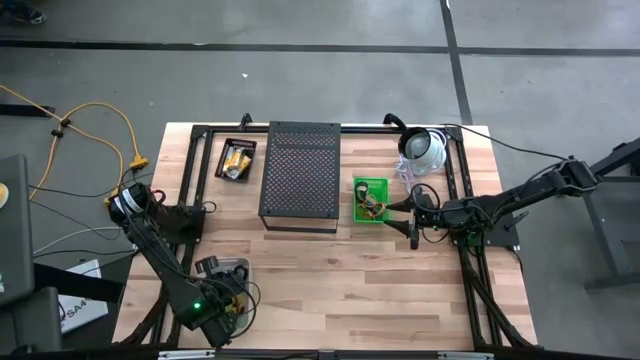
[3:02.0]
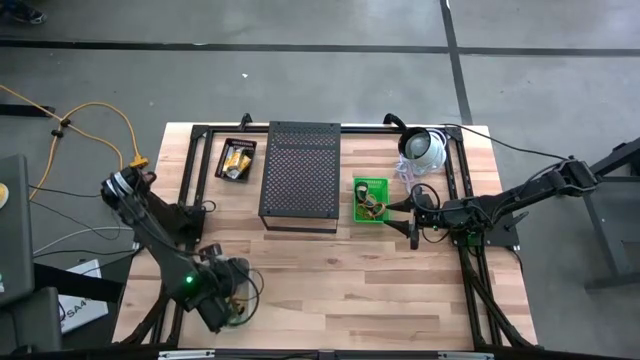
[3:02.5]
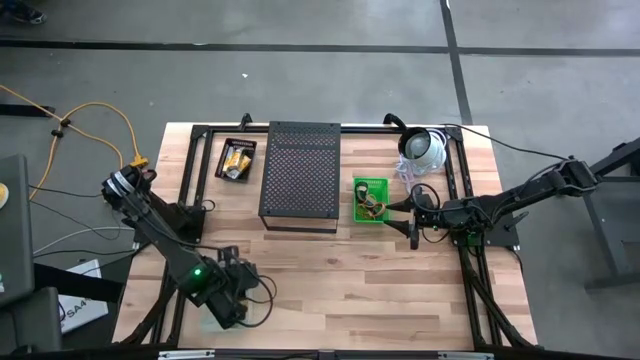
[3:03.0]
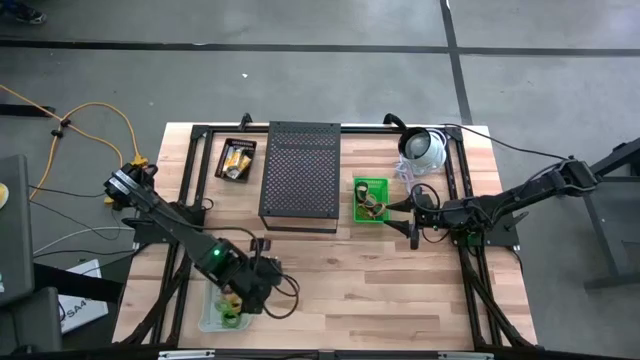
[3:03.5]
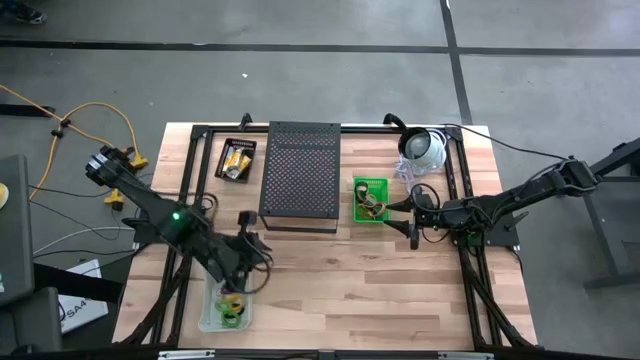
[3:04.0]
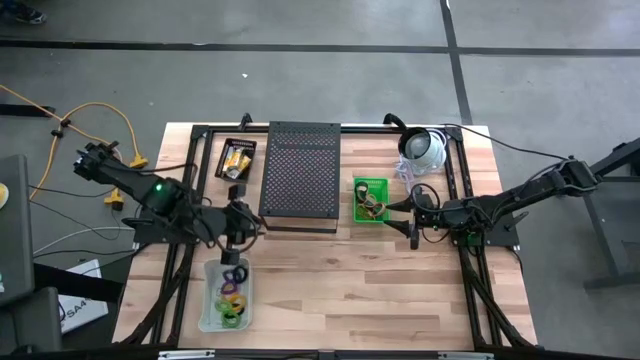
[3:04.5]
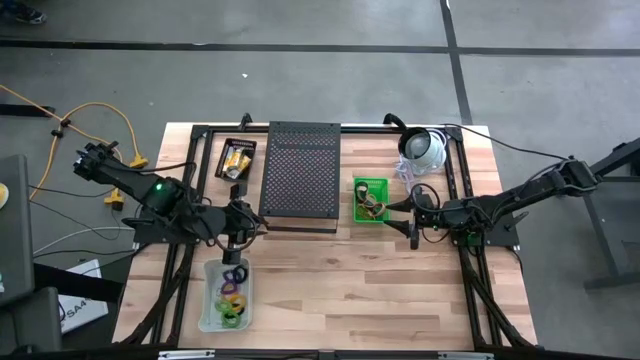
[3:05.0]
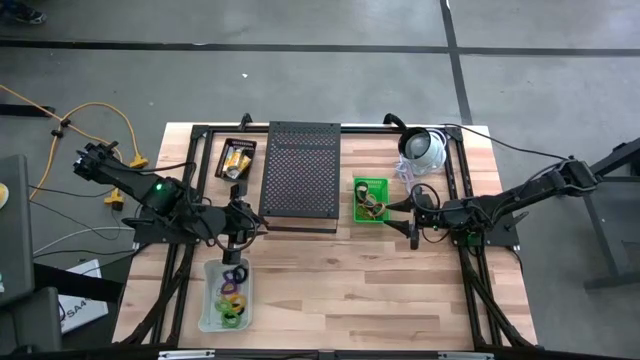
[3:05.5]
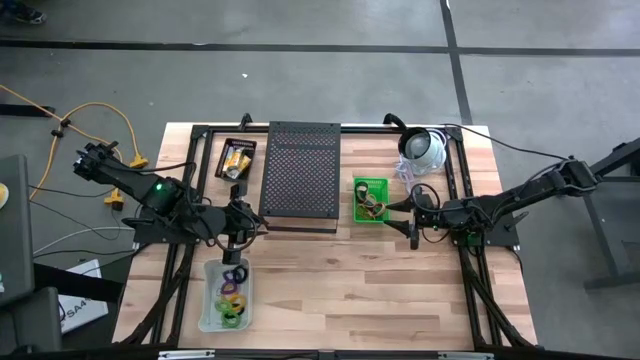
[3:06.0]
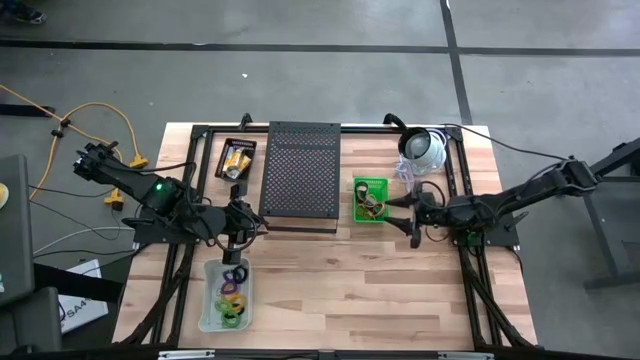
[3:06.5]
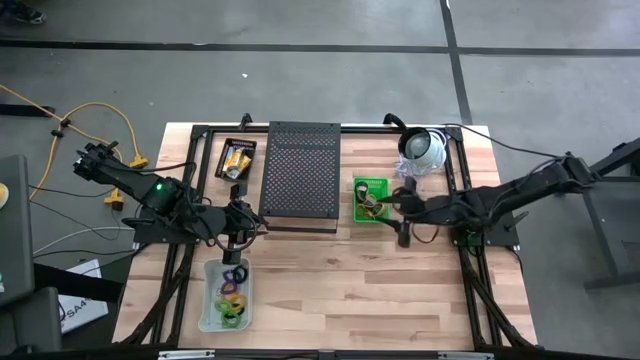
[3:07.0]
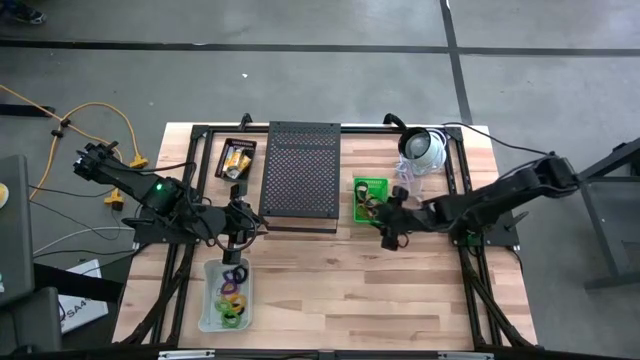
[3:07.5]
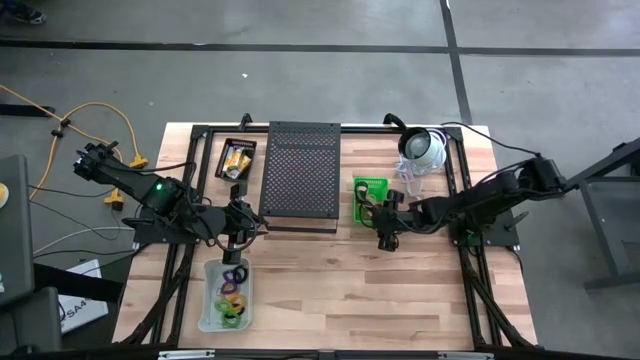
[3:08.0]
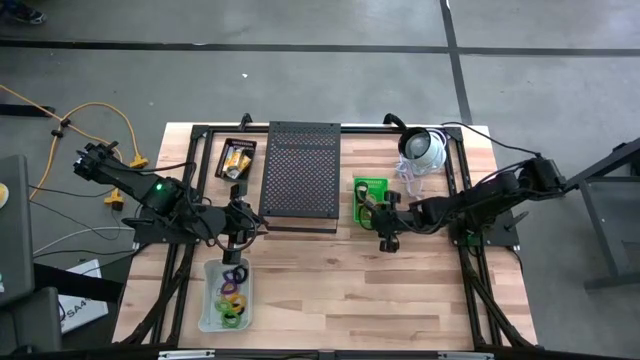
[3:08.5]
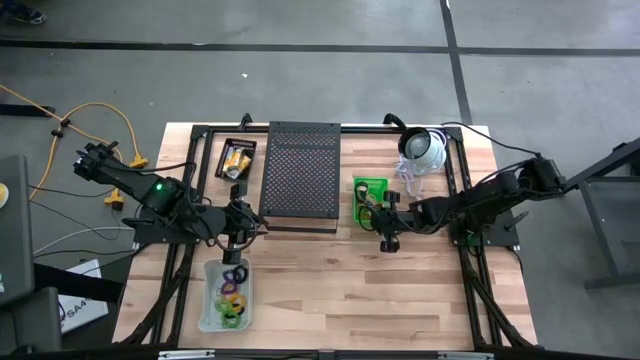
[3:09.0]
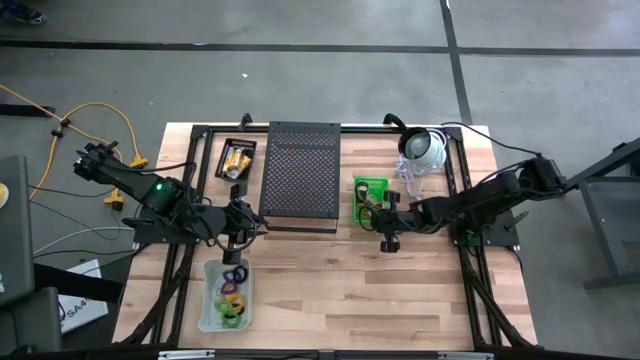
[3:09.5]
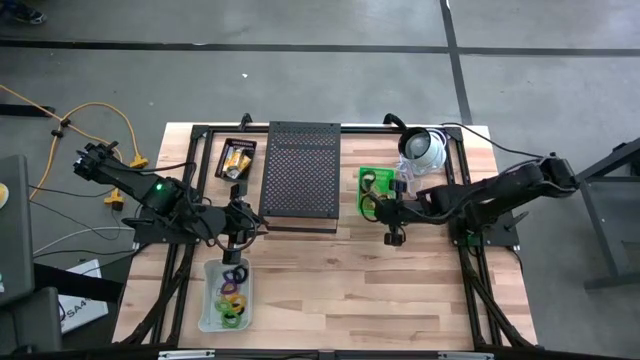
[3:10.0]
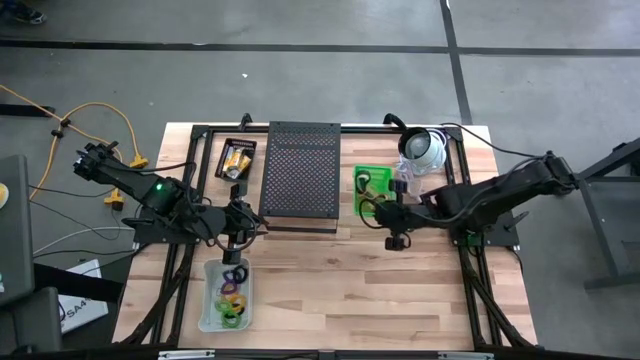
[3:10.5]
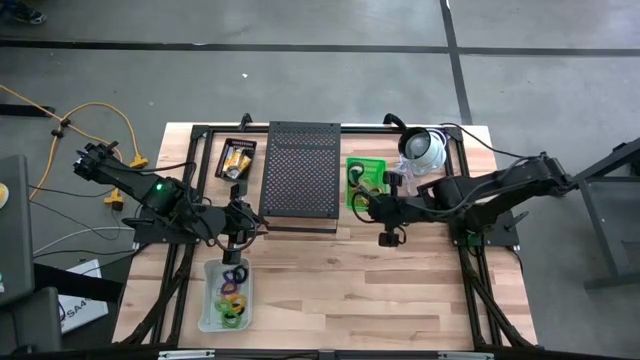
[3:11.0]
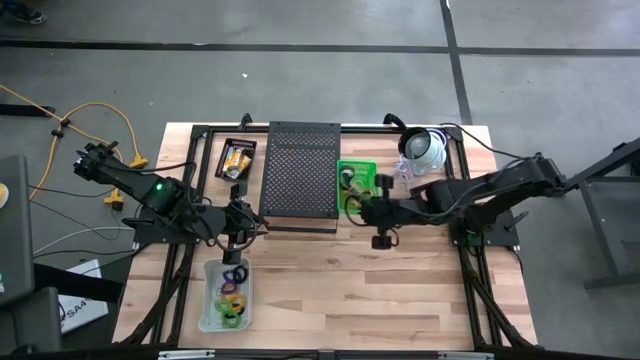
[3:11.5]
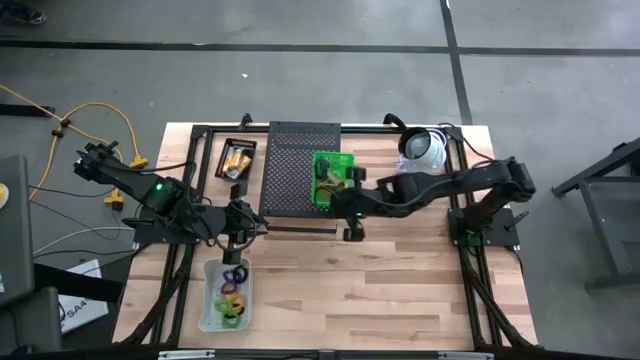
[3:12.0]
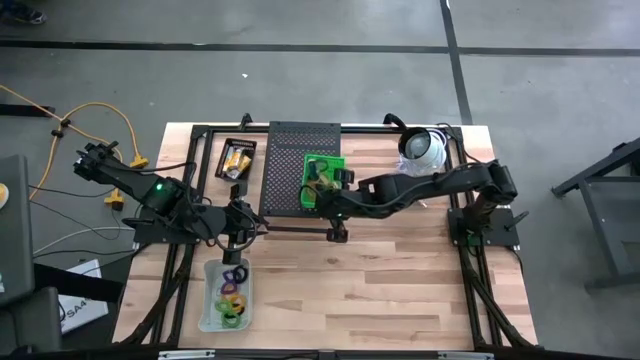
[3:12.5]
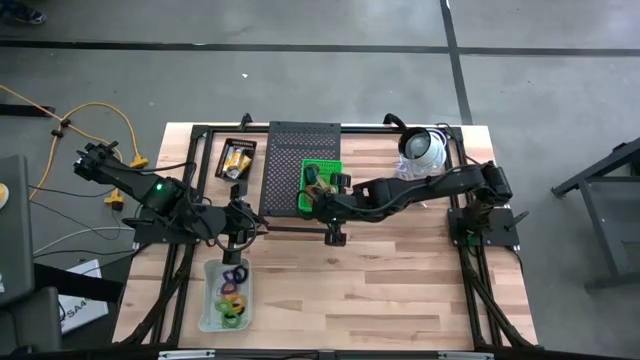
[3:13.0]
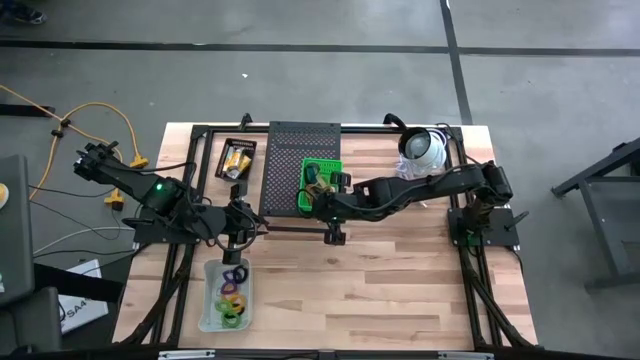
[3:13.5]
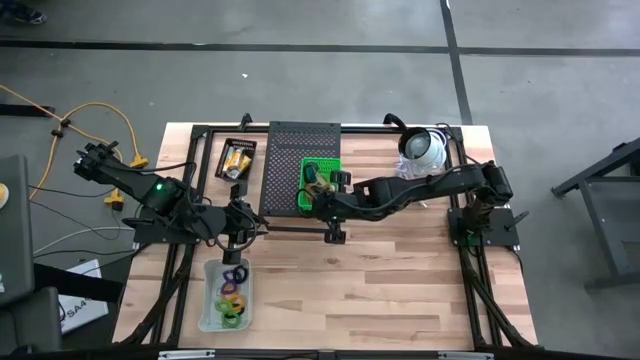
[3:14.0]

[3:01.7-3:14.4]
Task: Pick & Place Office Desk Supplies
Put the green bin with rubber bands on the shelf

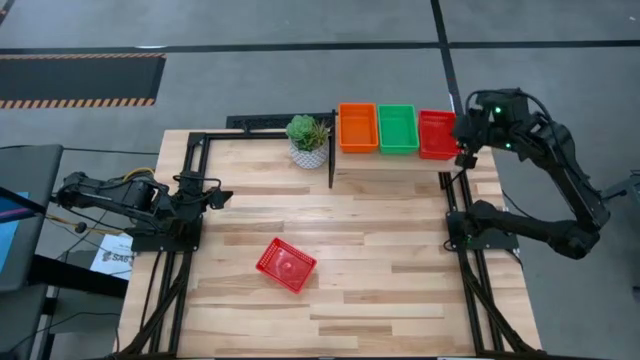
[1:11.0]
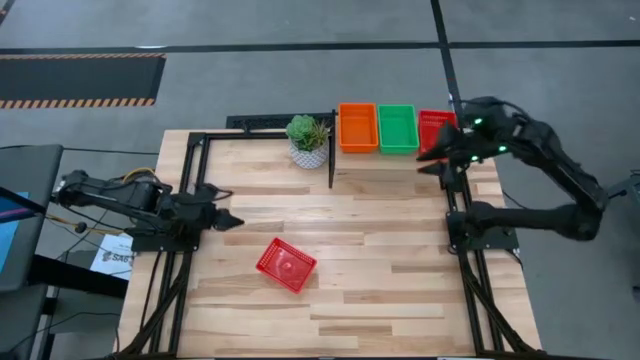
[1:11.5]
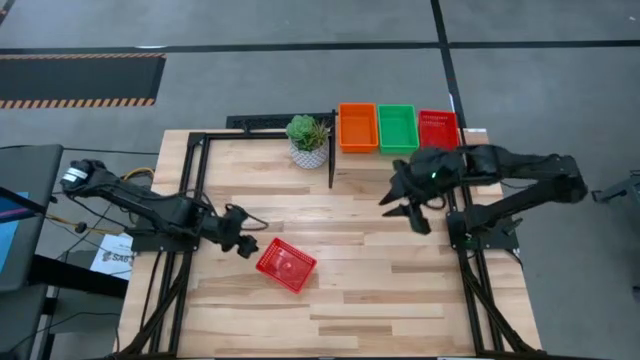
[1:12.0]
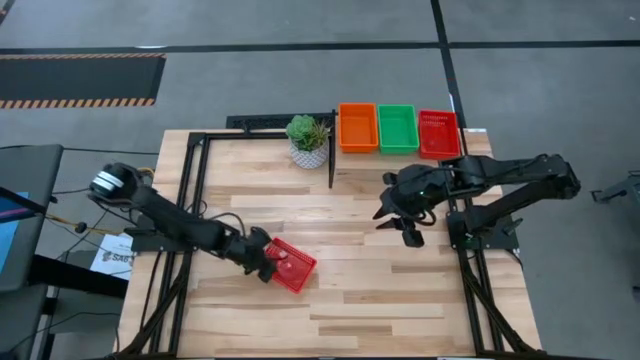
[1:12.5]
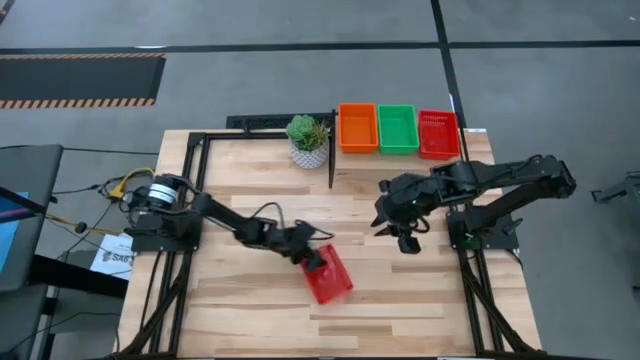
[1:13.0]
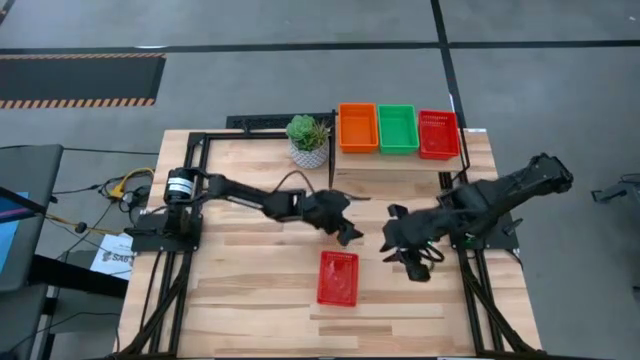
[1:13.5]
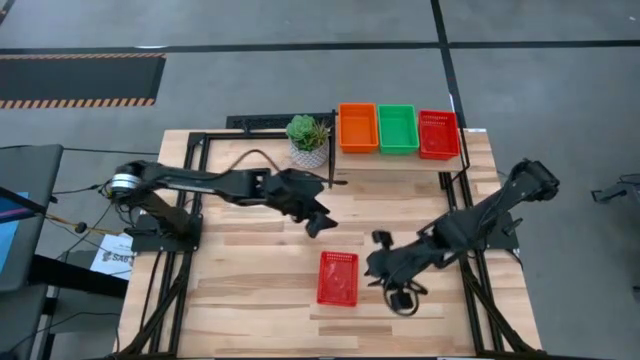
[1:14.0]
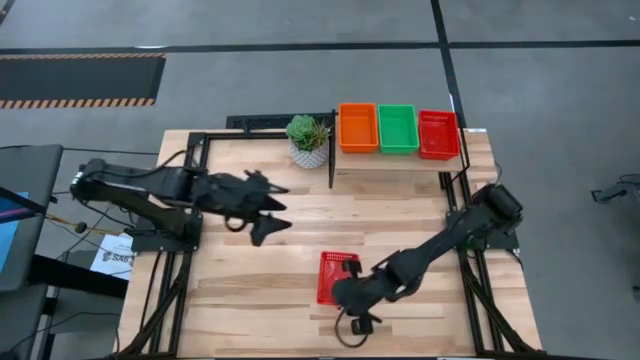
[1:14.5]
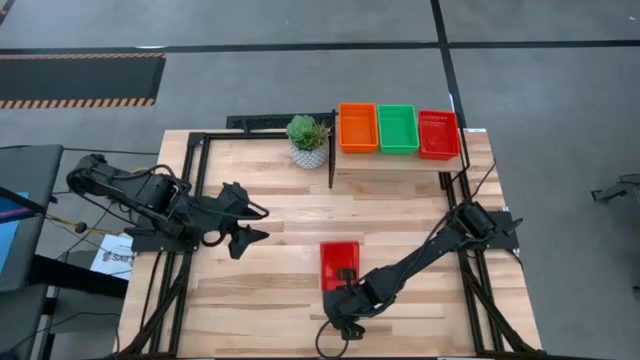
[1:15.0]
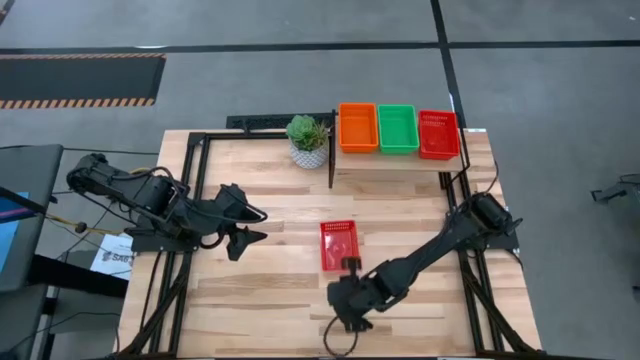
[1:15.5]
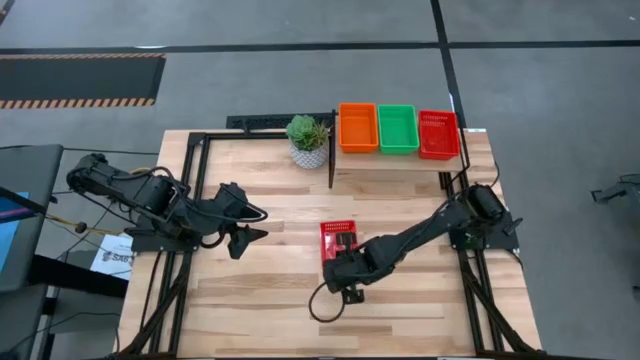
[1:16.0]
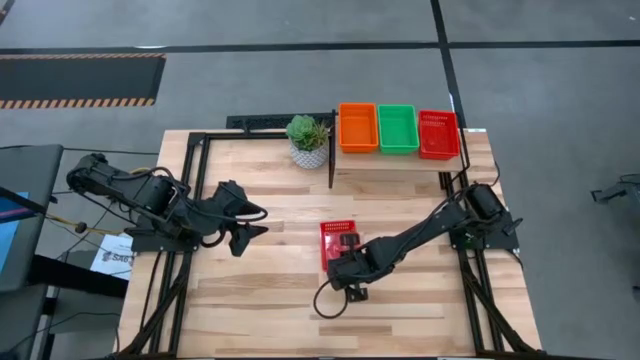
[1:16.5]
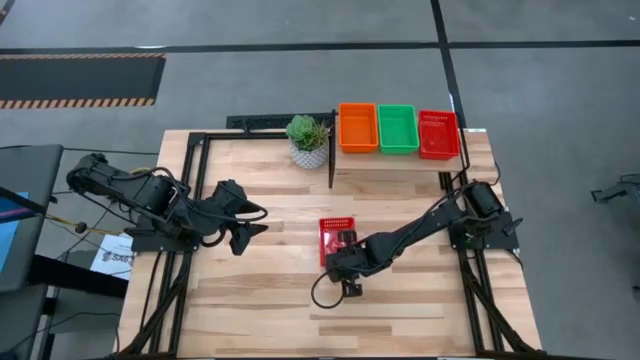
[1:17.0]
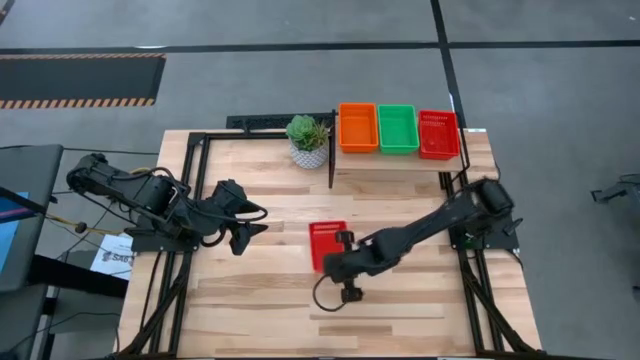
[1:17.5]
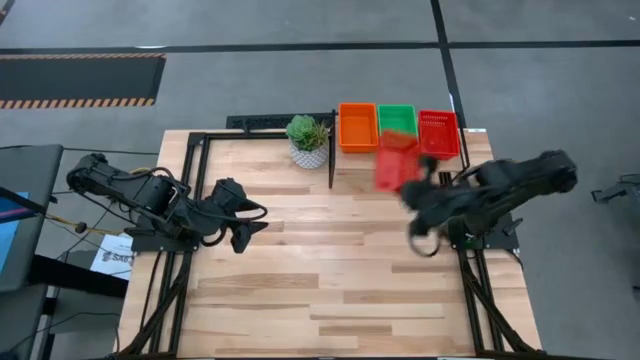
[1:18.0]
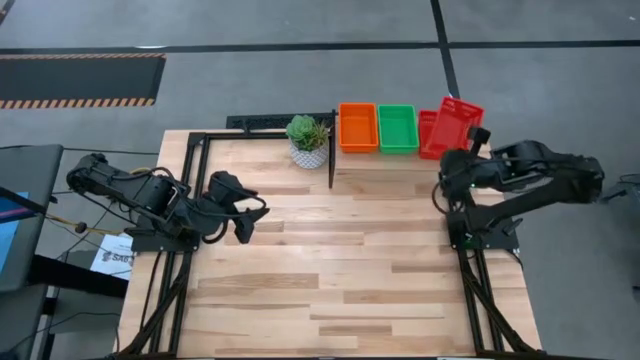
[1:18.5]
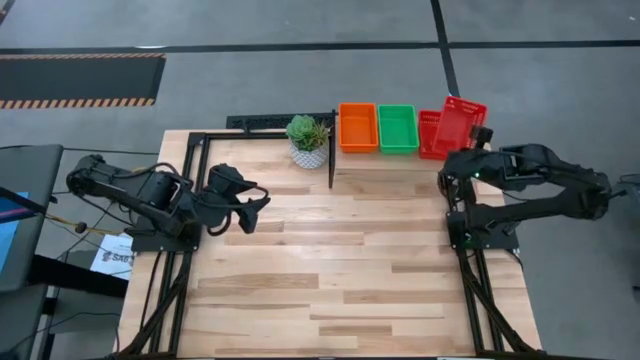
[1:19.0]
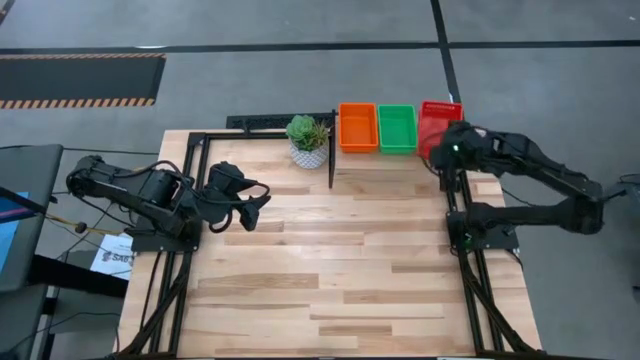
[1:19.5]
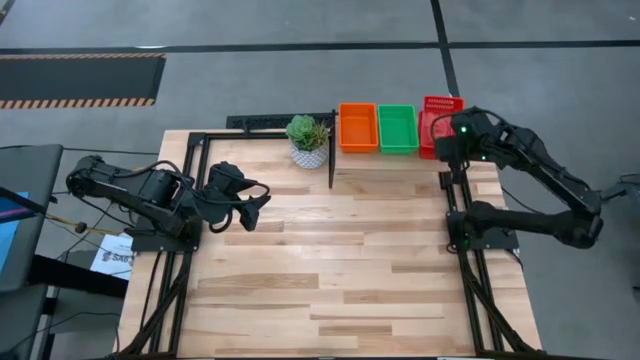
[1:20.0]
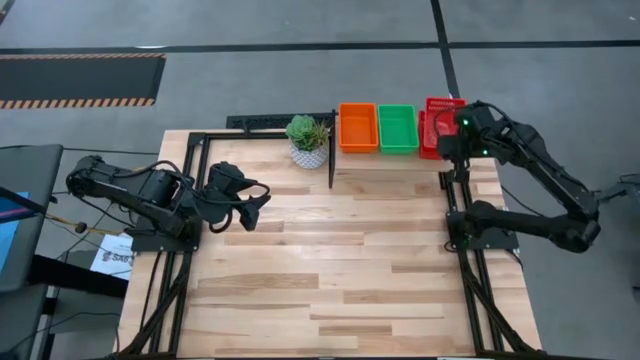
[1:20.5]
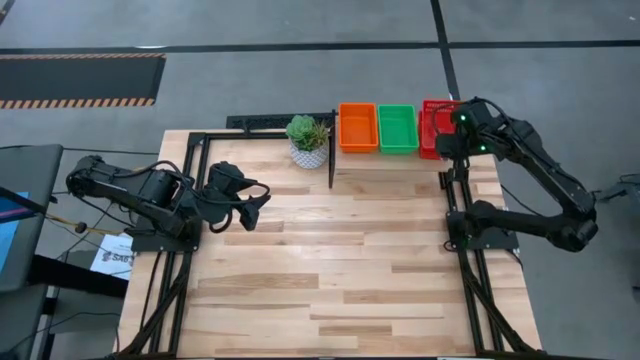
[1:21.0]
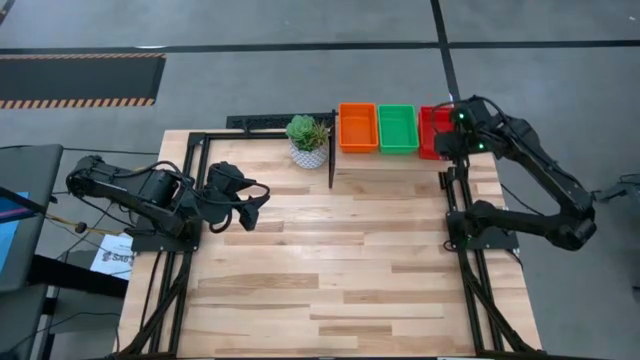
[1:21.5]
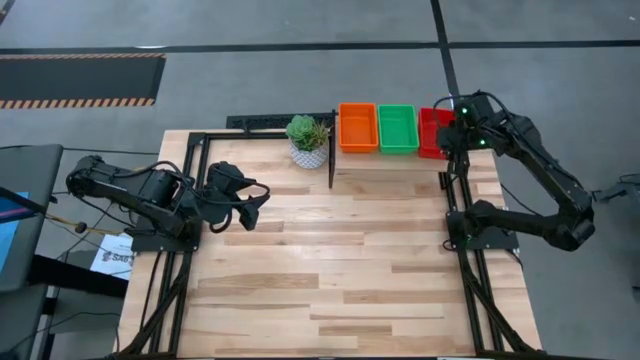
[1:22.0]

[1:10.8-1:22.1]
Task: Stack baskets on shelf by color
Stack the red bin on the red bin on the shelf
